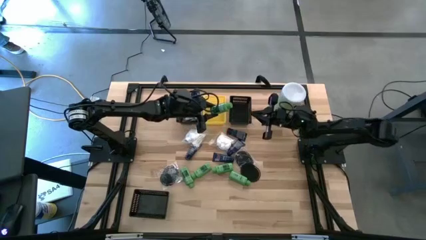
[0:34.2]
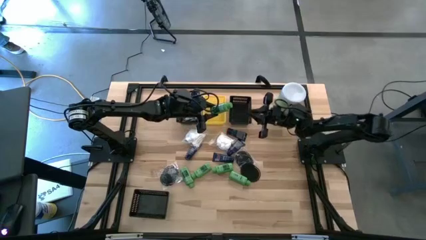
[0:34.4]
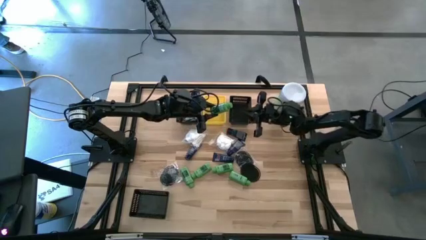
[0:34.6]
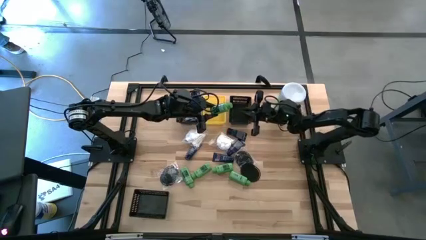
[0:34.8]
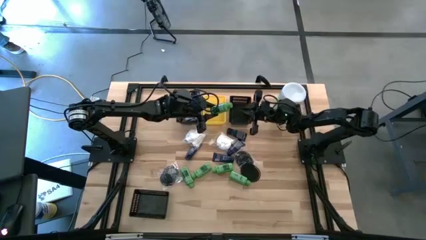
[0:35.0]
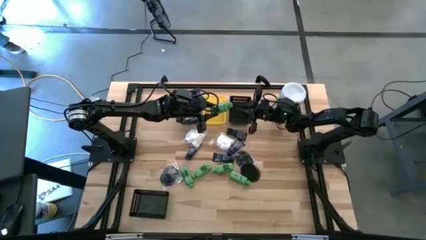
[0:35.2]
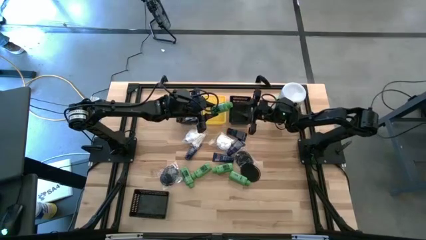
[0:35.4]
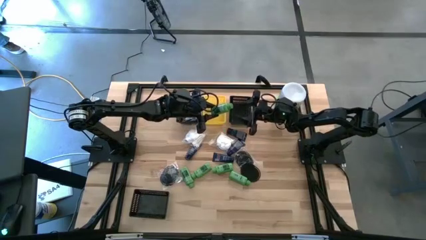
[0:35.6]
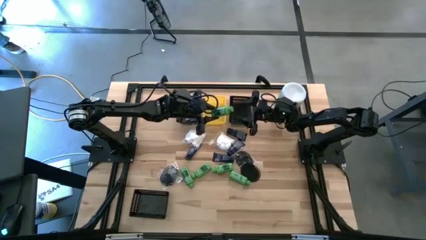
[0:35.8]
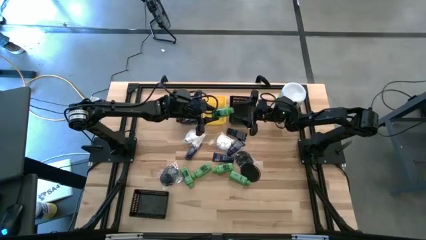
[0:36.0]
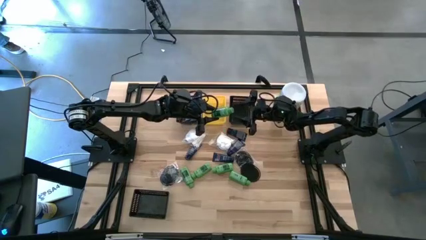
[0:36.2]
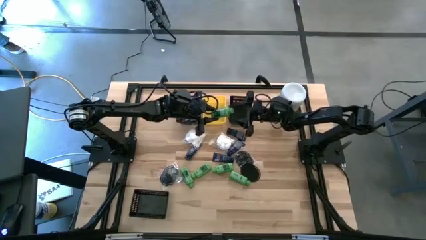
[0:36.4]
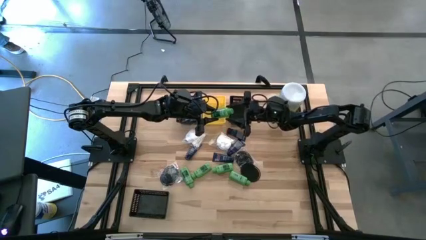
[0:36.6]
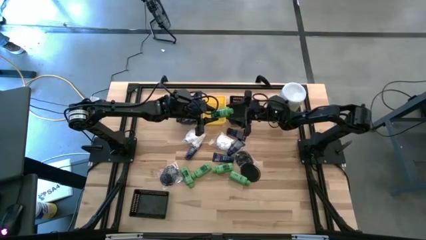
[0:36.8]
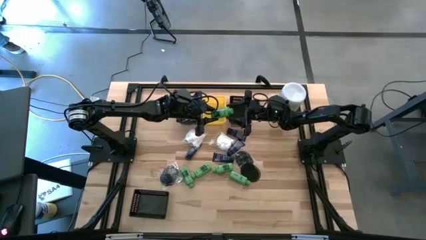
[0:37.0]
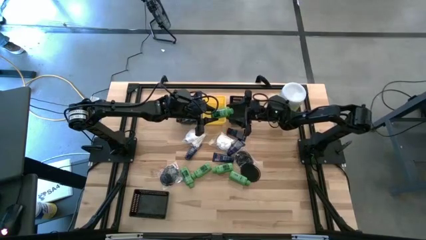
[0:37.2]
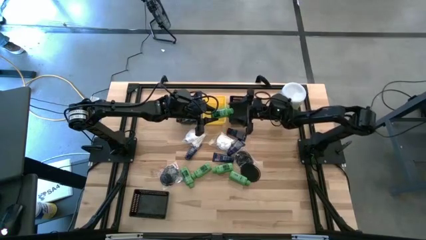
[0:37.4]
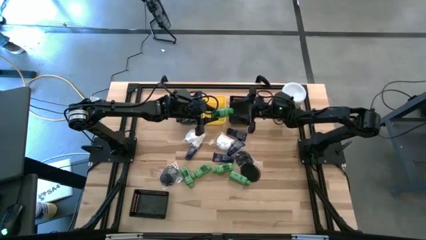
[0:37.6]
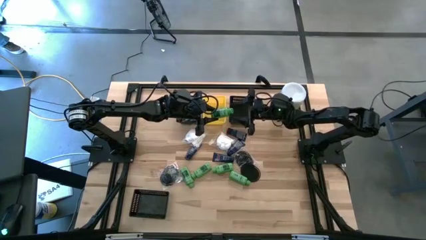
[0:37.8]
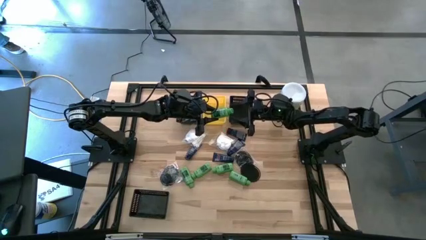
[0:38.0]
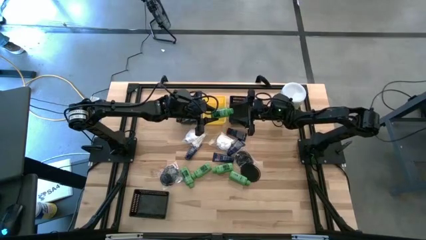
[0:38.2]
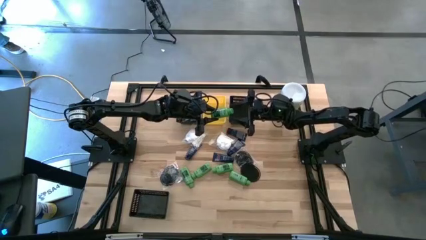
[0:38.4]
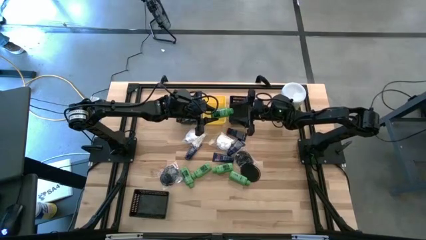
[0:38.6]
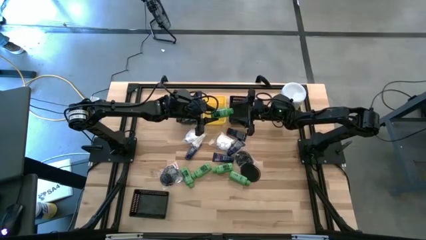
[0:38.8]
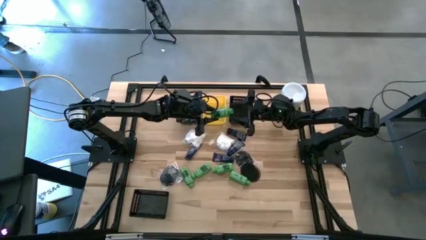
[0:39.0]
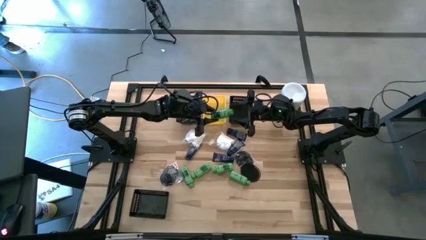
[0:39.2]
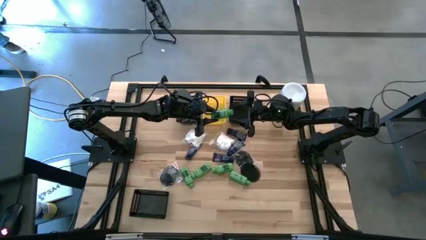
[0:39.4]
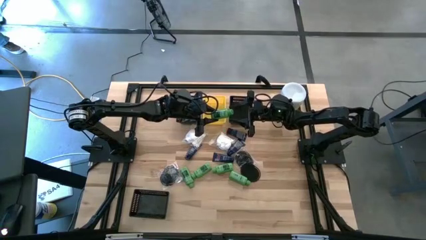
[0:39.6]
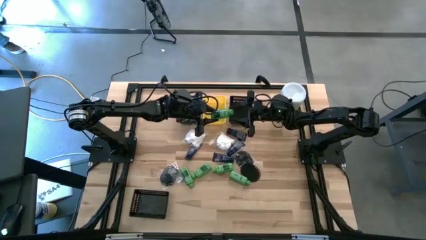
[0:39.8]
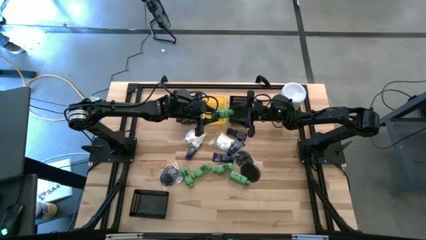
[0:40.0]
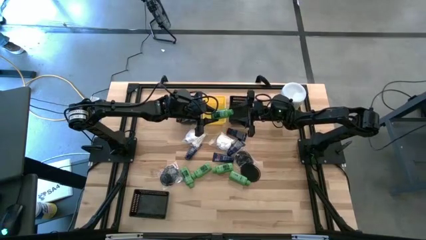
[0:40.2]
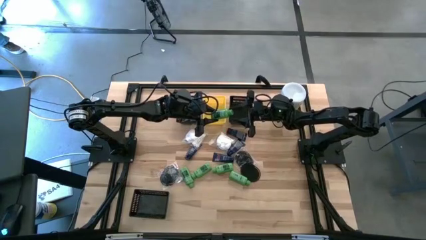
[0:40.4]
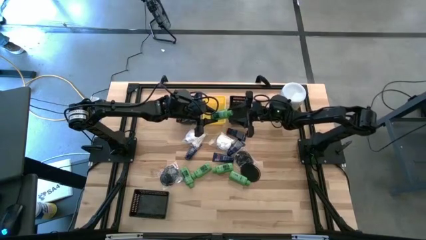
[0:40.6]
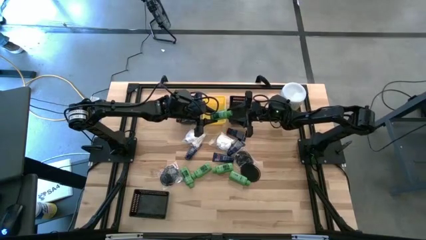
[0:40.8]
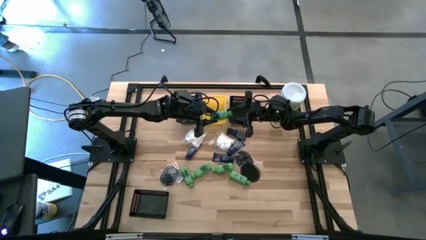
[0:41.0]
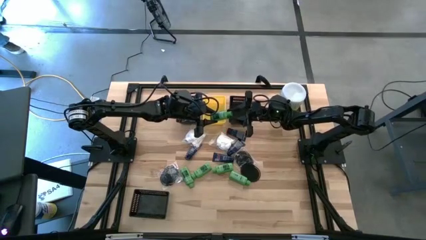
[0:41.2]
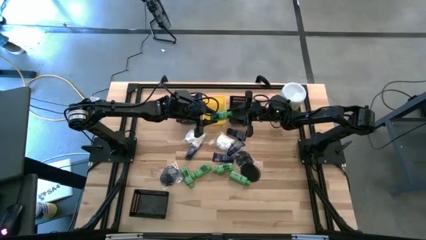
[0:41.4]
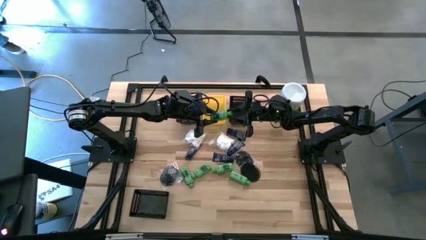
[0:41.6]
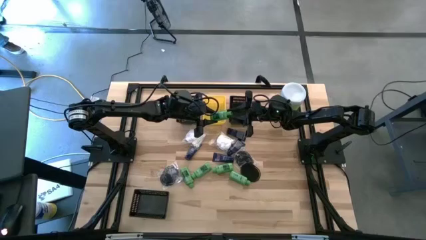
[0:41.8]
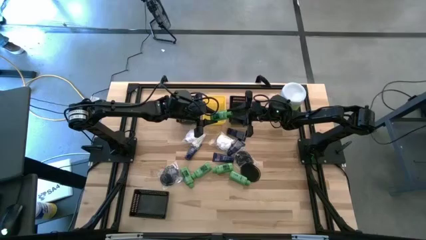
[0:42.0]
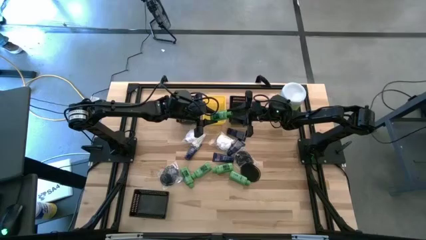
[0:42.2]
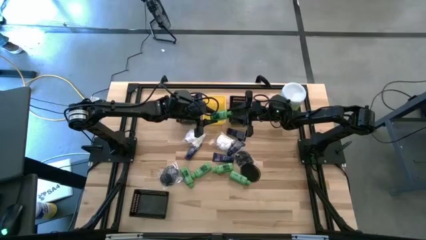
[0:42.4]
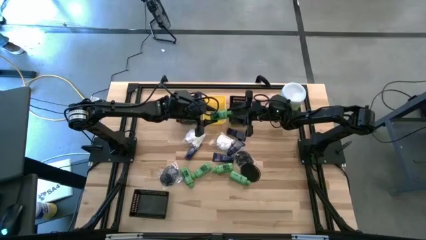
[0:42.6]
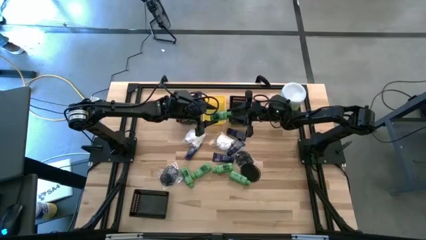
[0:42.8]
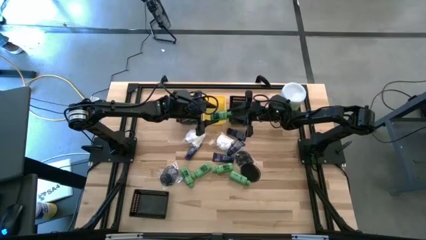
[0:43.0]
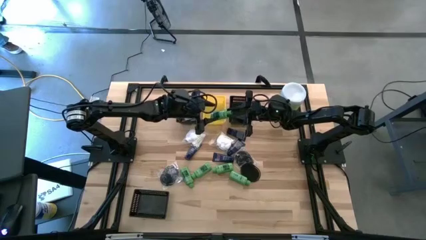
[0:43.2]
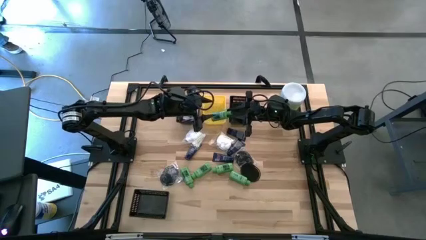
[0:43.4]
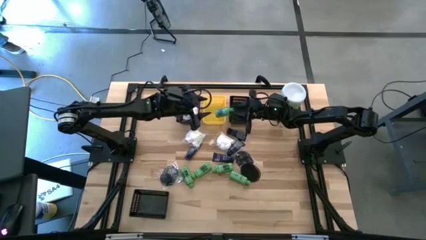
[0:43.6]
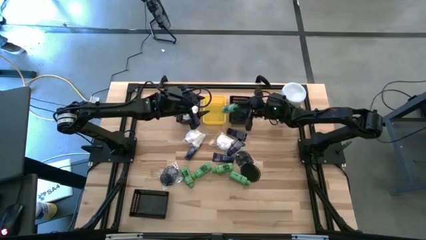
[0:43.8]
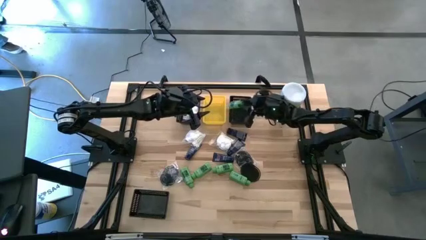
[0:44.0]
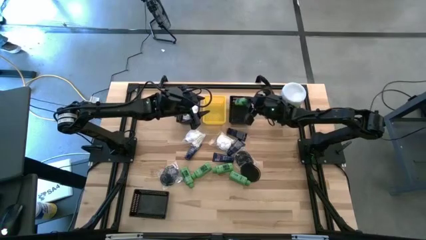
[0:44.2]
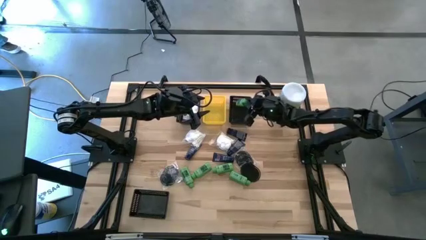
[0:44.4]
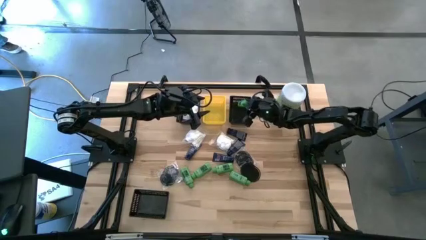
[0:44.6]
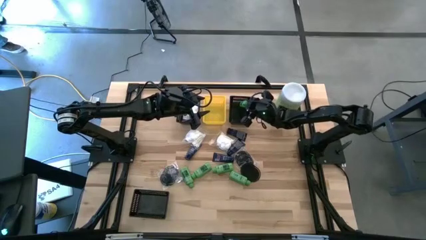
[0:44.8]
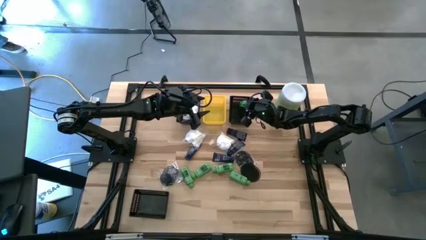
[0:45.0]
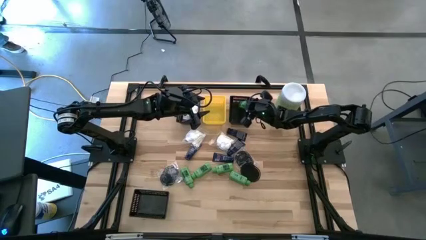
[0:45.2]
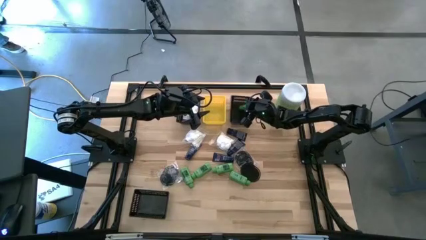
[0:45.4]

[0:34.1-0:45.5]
Task: Pick & Place Travel size toiletries
Put the green shampoo bottle into the top right black bin
